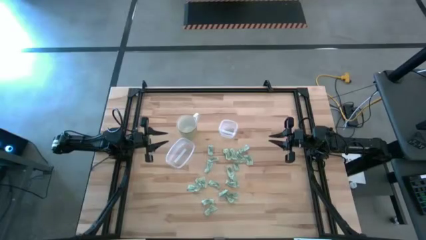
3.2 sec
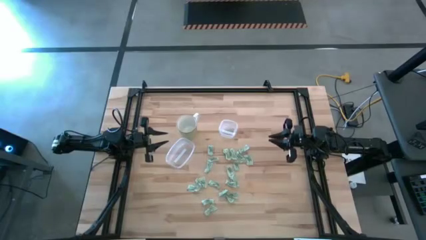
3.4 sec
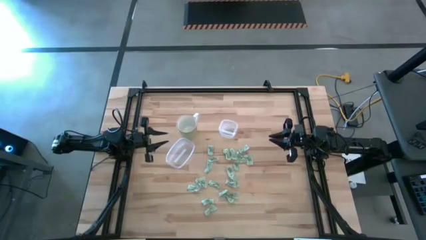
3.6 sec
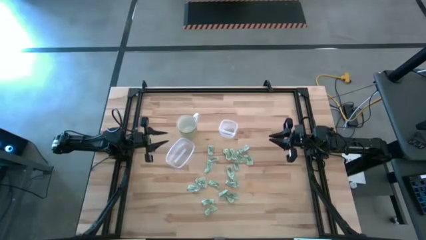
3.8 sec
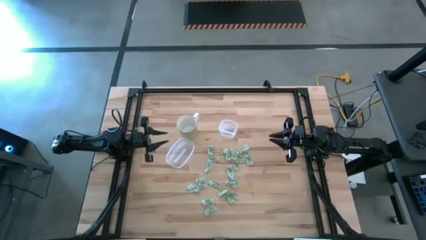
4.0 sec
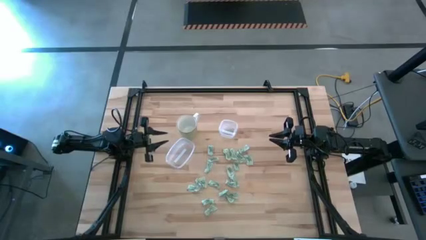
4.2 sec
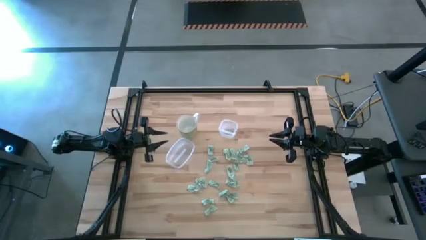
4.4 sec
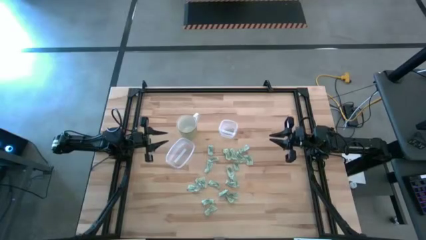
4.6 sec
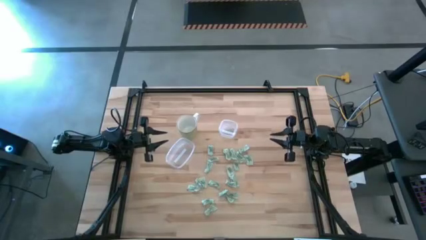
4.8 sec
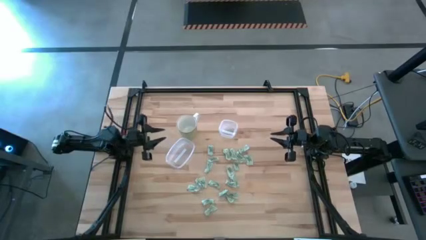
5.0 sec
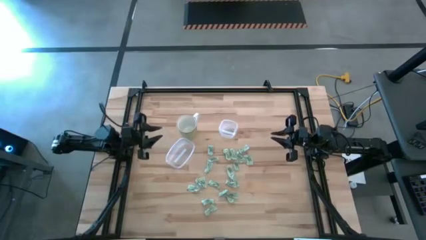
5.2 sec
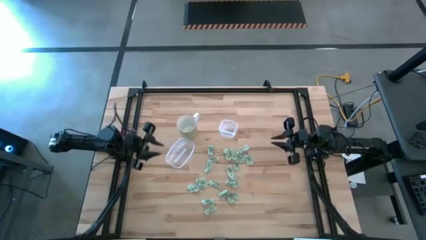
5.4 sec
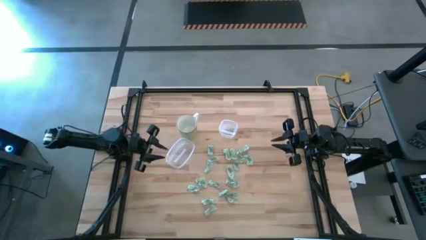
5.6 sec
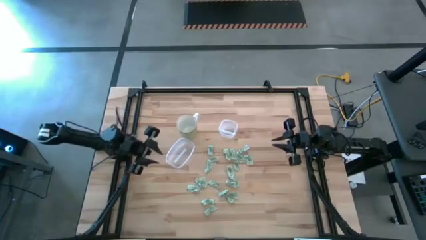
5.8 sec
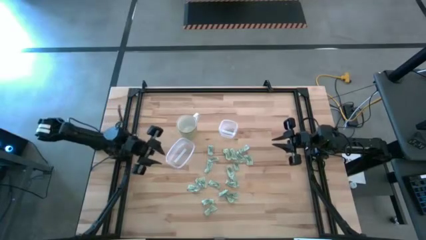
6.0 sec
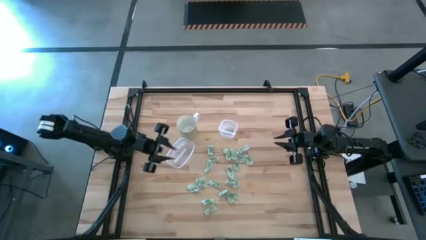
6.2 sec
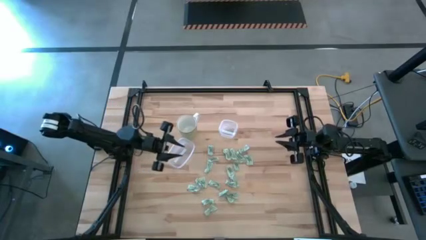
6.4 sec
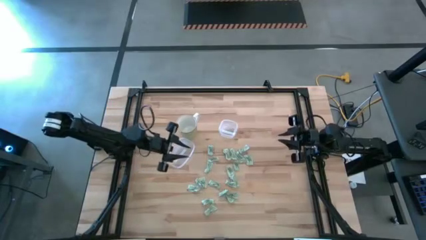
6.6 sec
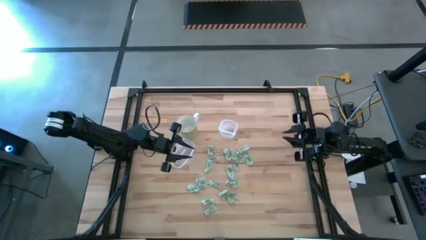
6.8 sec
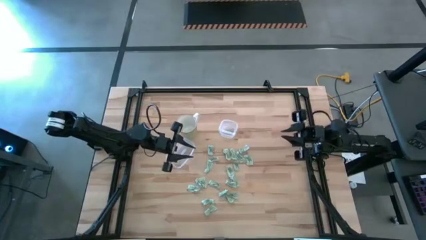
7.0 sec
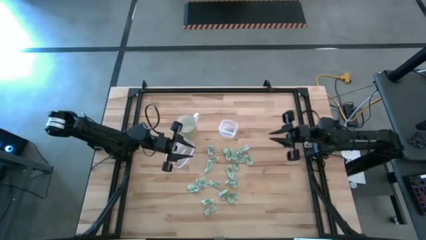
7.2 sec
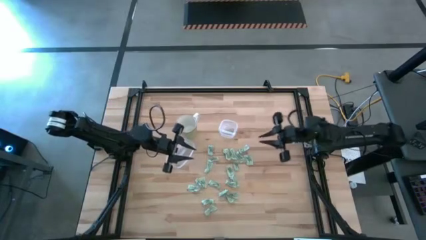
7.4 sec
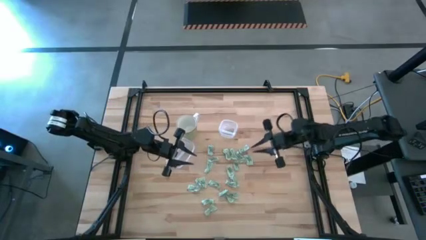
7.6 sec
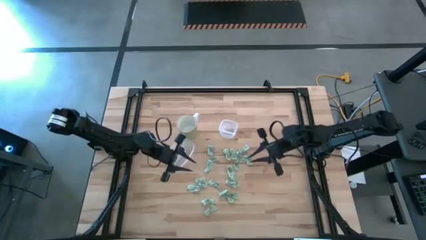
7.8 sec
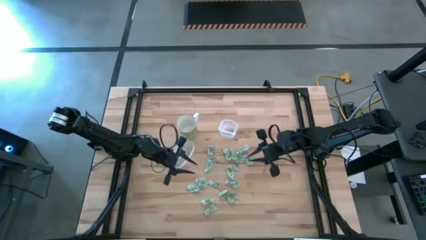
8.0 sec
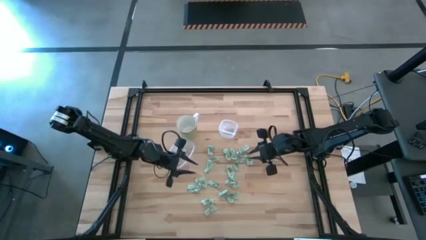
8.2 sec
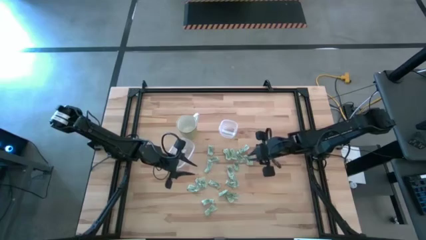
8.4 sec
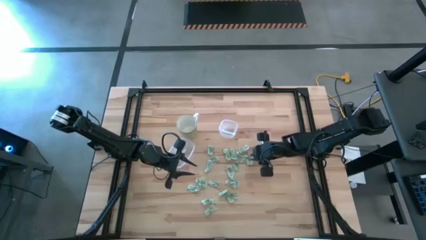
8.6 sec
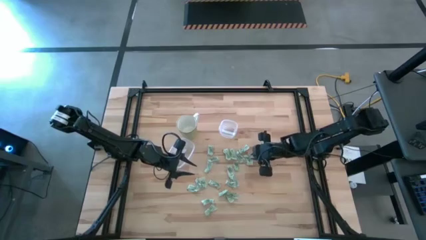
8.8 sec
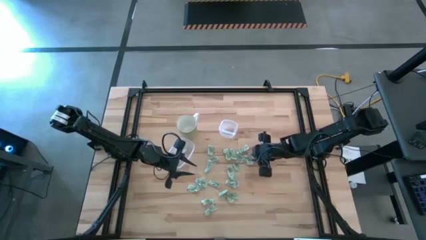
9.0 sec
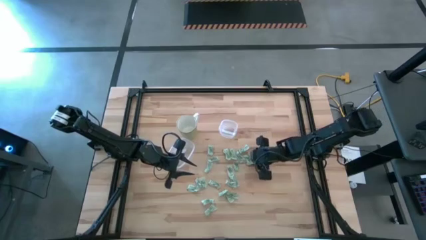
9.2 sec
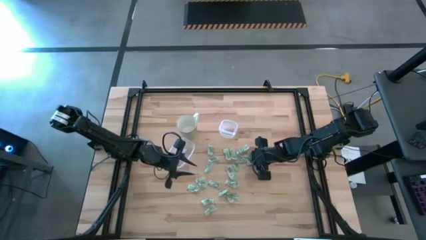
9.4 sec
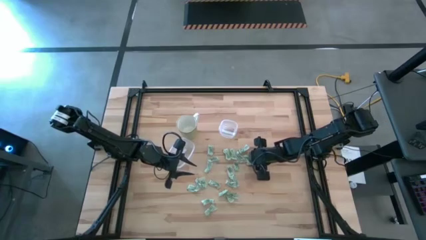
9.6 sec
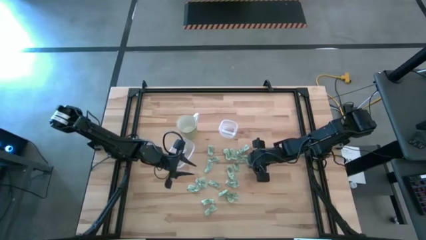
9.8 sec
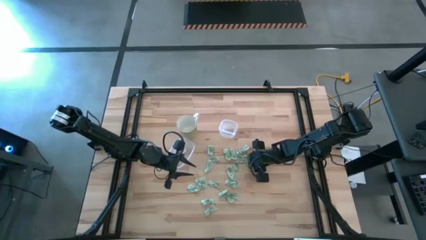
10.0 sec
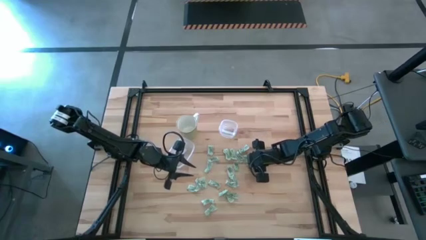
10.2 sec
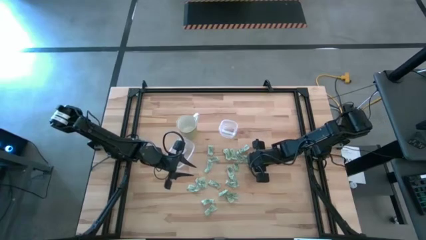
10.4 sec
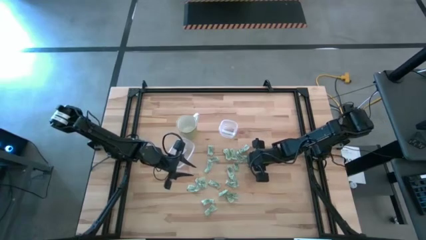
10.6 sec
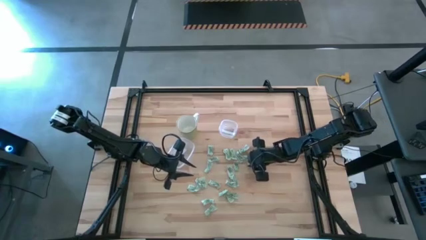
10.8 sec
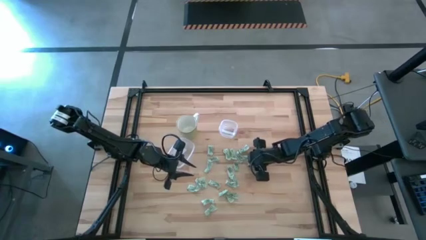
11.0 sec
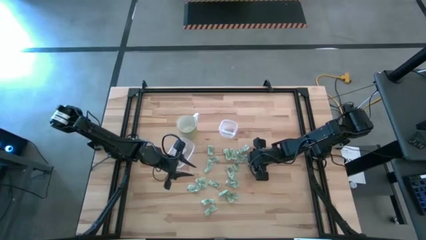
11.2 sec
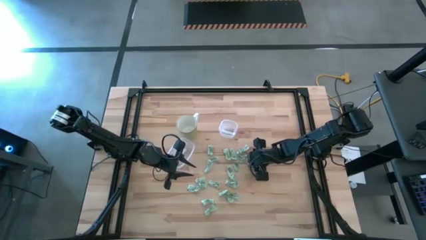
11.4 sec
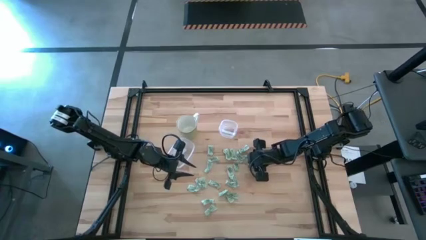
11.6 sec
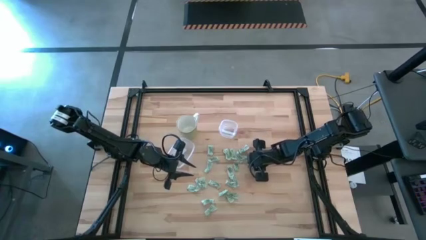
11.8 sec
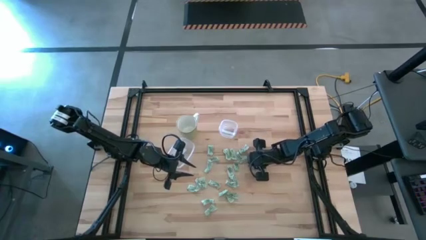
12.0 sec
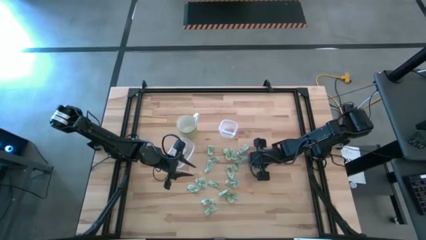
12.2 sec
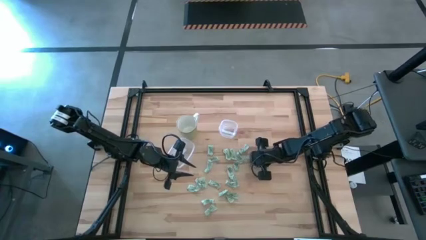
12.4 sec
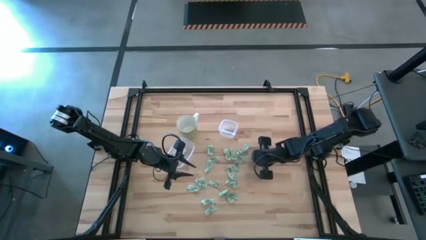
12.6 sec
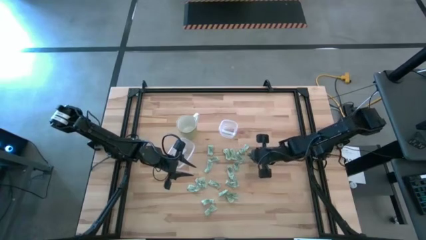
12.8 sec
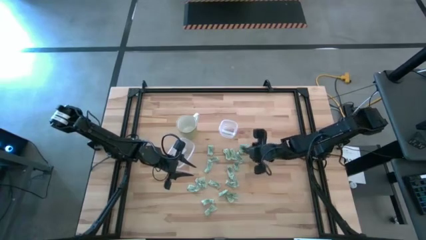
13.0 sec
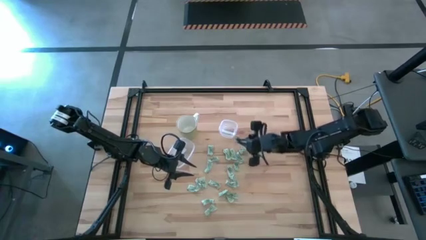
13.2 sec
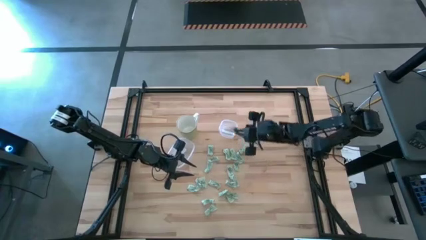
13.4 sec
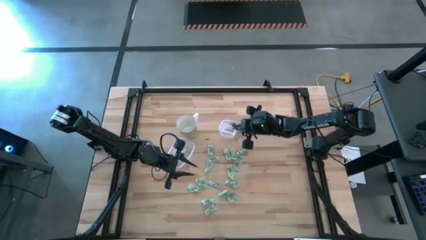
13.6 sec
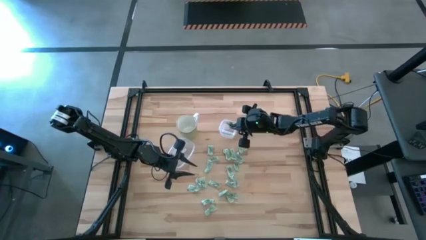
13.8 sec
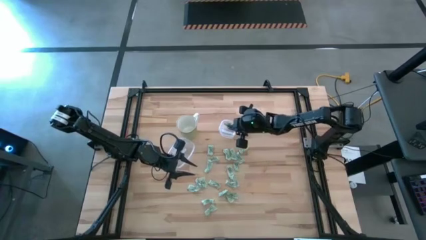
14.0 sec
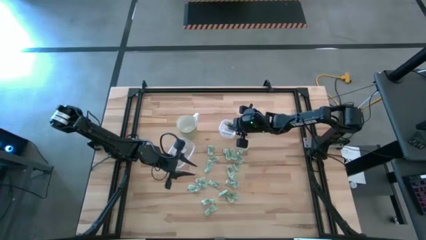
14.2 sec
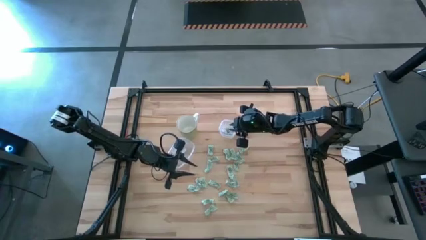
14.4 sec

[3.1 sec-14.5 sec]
Task: Pick and place items into bin
Put the stevia packet into the top transparent bin

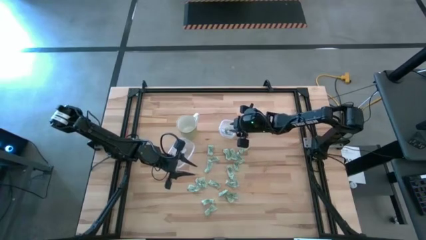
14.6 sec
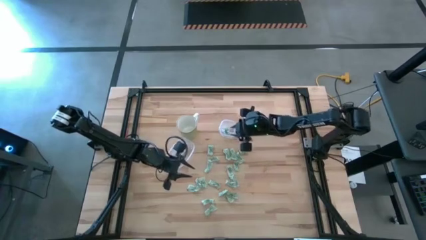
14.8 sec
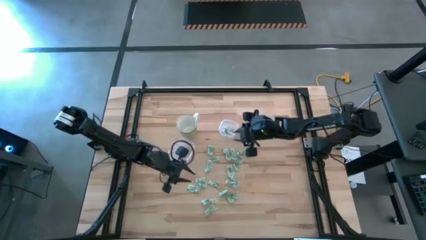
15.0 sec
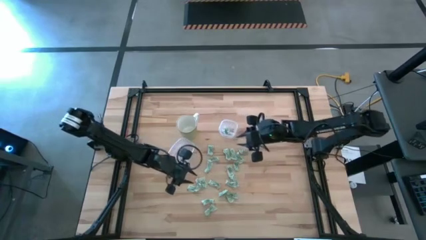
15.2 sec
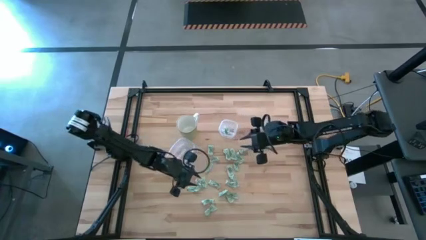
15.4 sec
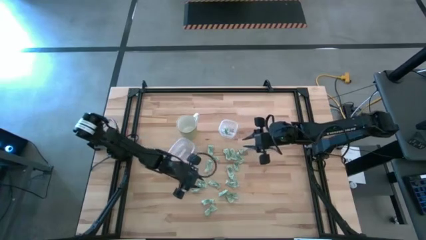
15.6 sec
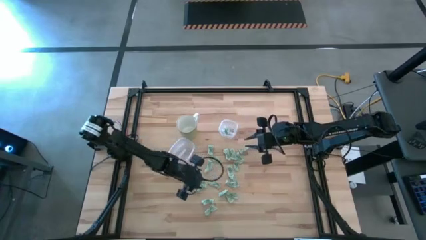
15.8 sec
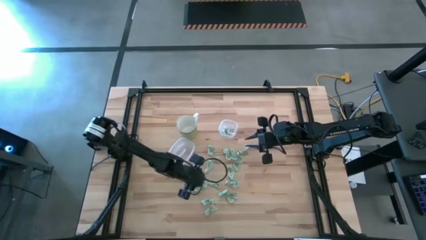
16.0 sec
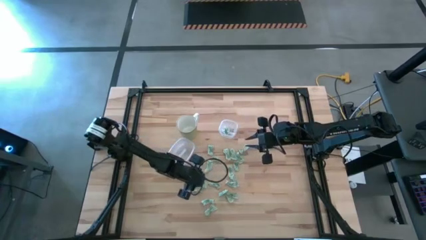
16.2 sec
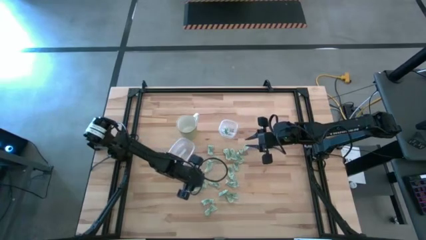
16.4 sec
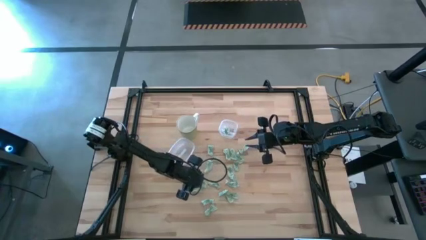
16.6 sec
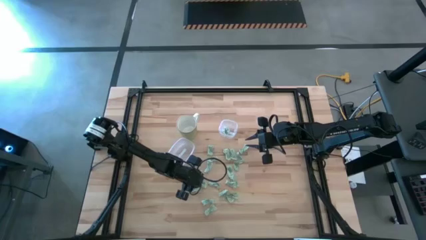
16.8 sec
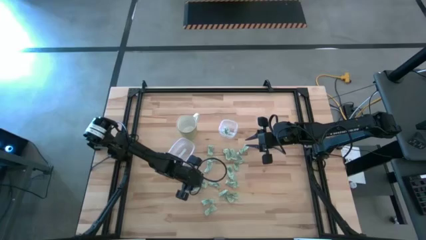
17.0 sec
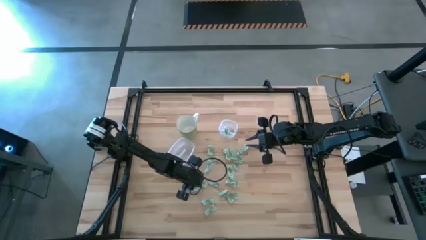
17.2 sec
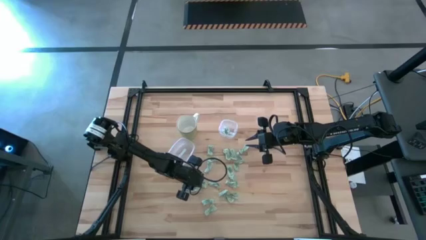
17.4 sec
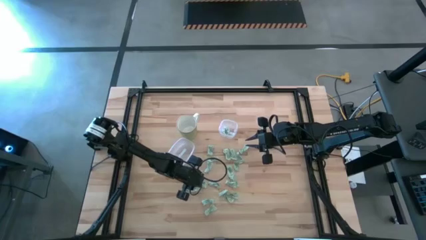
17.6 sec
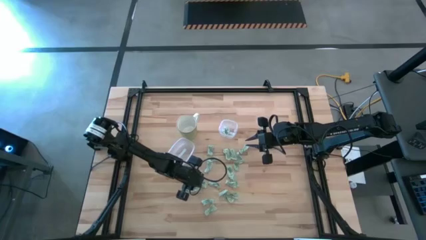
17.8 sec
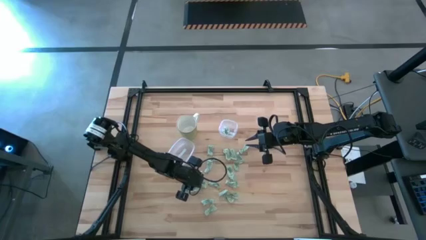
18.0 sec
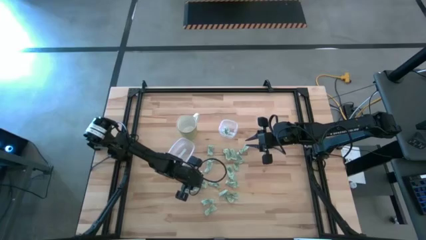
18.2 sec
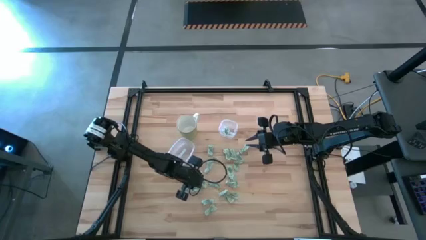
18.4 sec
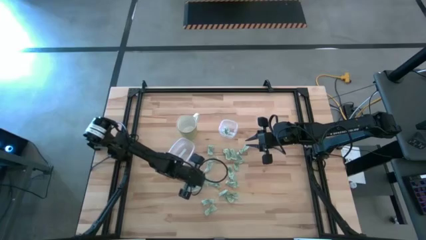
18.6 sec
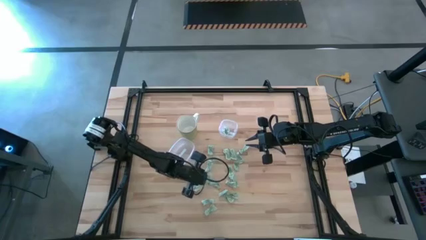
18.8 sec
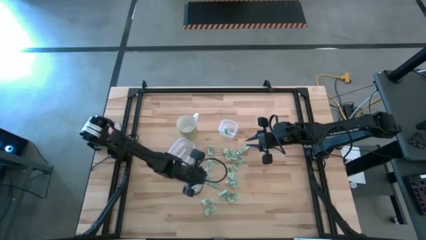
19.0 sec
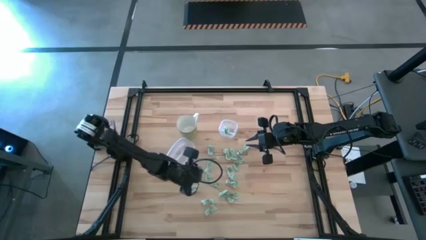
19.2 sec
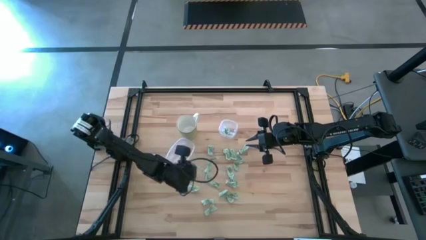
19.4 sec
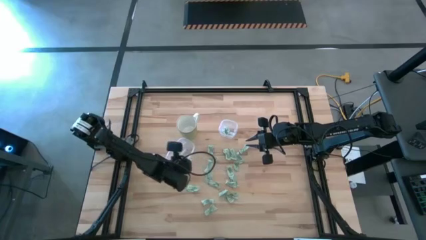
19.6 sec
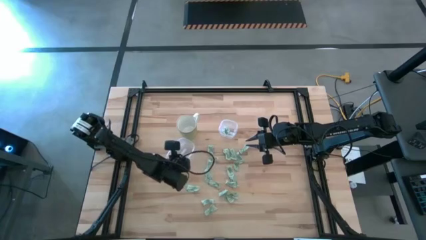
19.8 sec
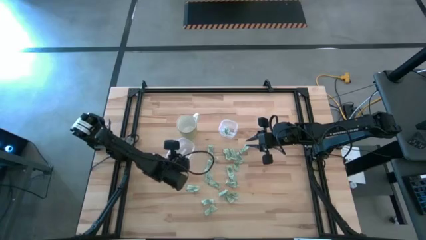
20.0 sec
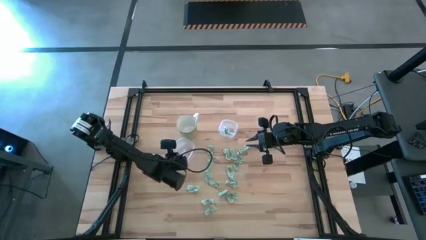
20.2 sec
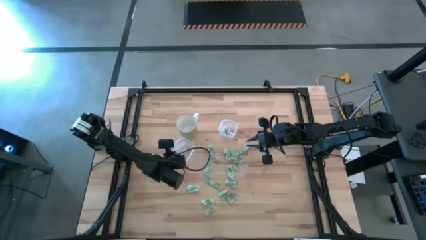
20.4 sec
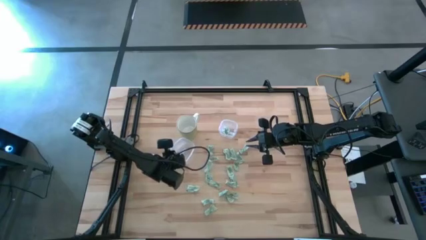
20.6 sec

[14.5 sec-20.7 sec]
Put the stevia packet into the bottom transparent bin
